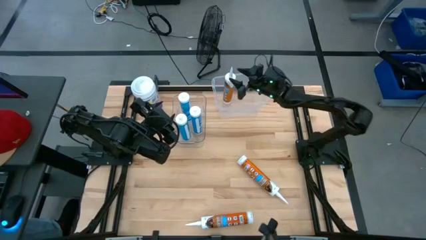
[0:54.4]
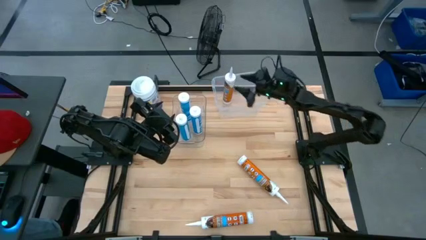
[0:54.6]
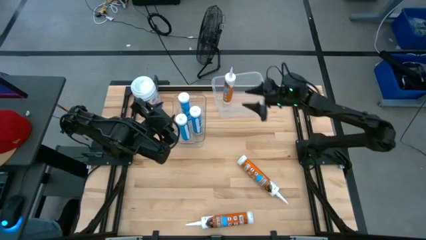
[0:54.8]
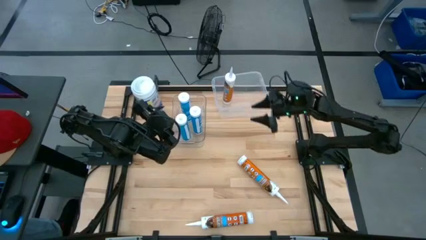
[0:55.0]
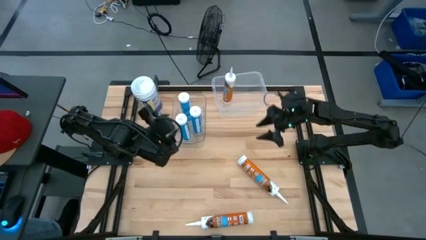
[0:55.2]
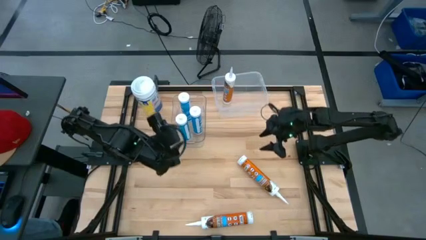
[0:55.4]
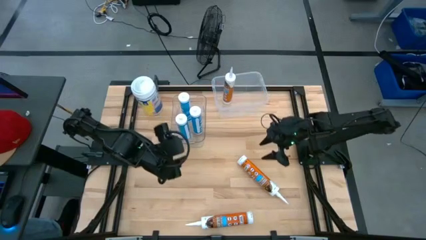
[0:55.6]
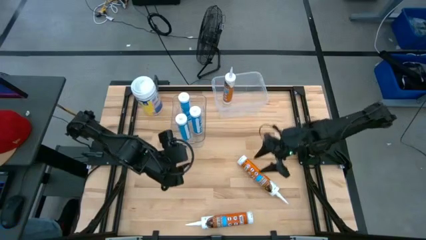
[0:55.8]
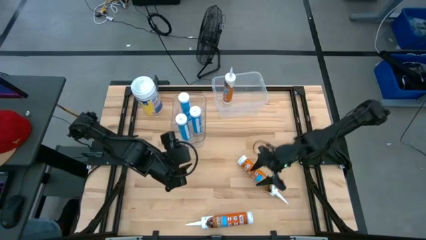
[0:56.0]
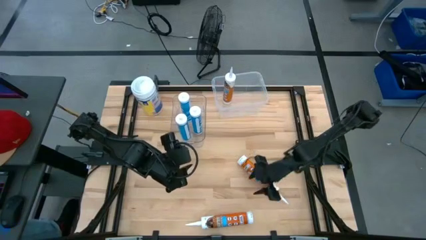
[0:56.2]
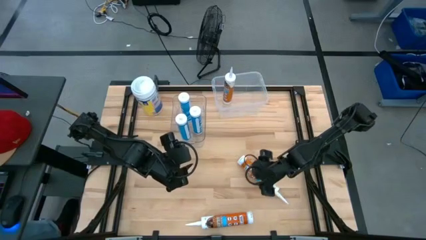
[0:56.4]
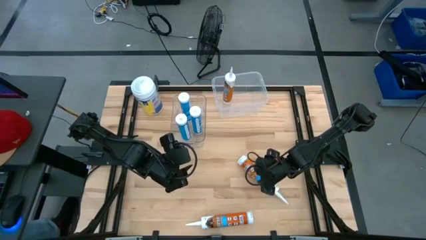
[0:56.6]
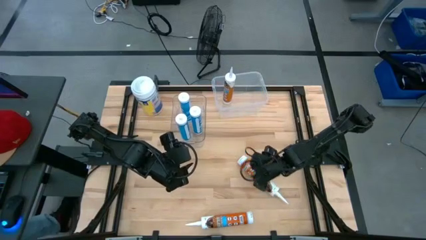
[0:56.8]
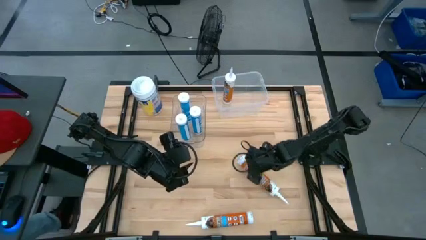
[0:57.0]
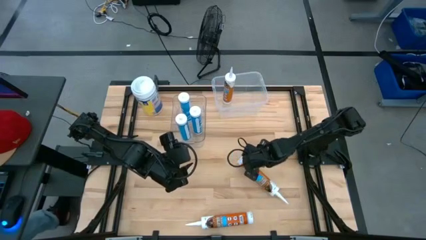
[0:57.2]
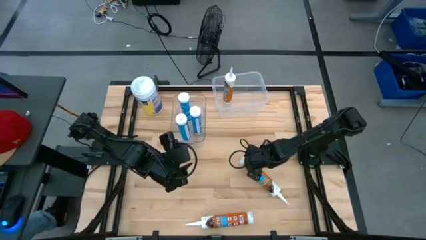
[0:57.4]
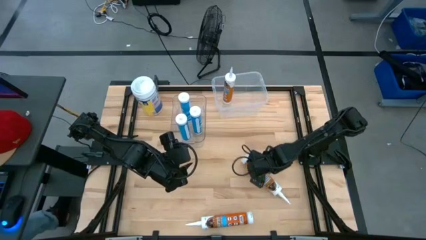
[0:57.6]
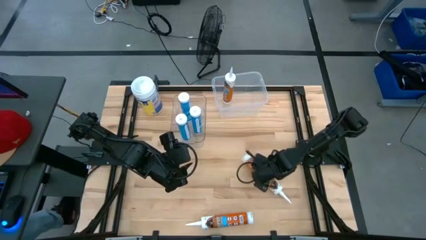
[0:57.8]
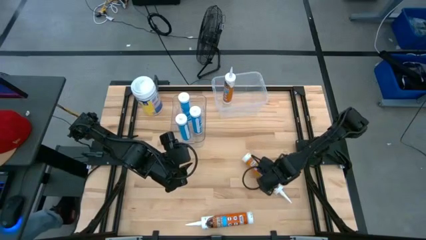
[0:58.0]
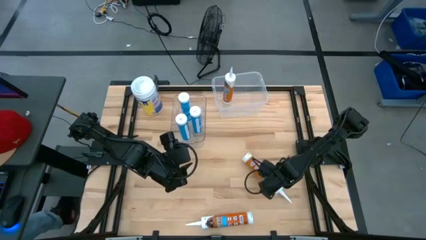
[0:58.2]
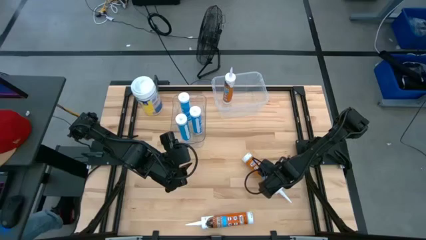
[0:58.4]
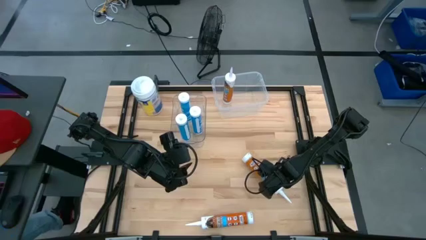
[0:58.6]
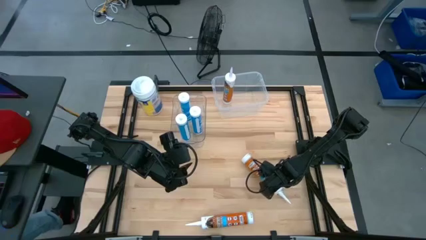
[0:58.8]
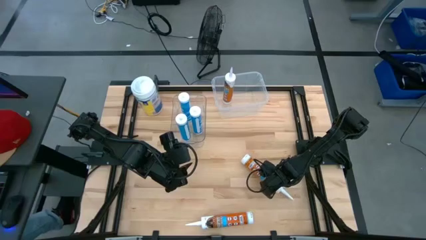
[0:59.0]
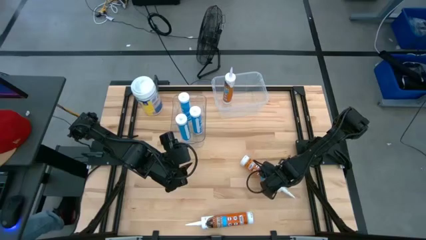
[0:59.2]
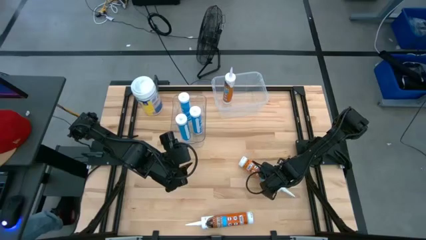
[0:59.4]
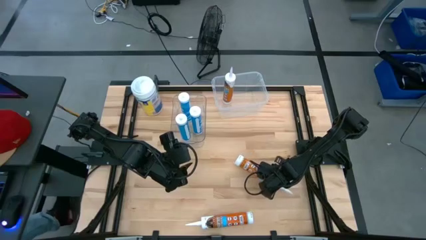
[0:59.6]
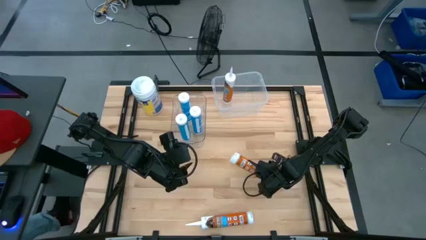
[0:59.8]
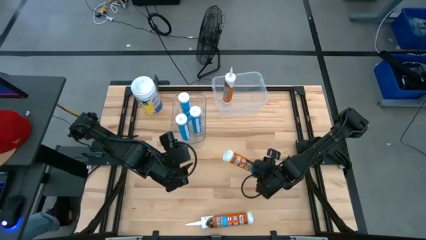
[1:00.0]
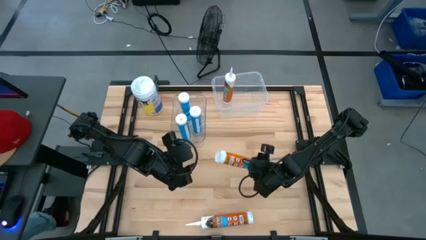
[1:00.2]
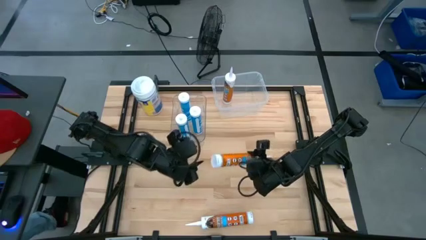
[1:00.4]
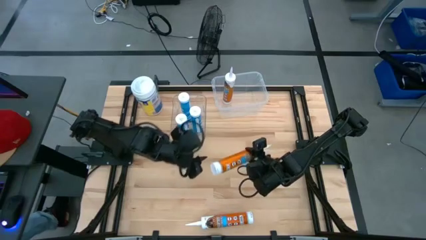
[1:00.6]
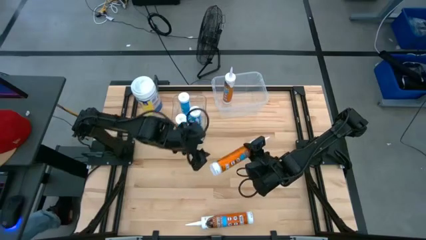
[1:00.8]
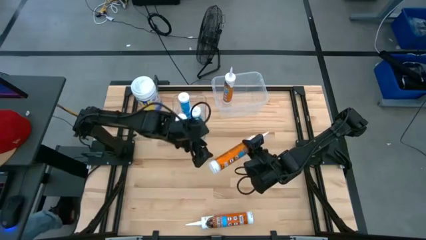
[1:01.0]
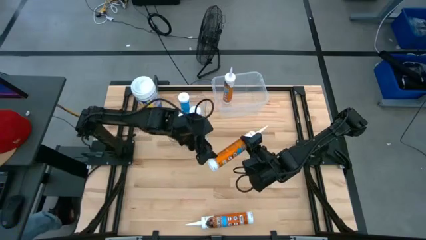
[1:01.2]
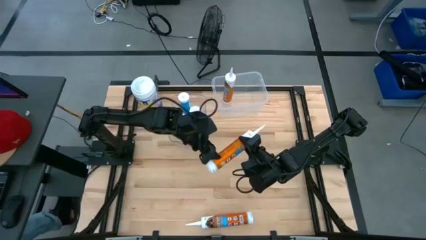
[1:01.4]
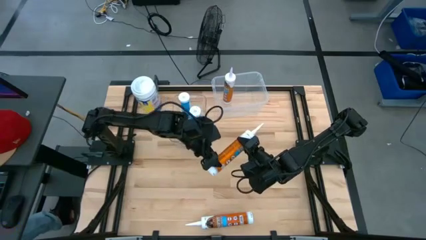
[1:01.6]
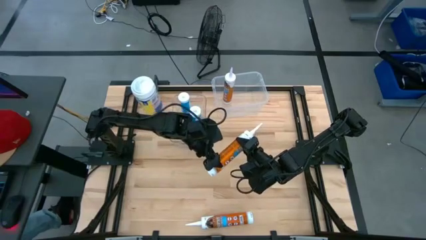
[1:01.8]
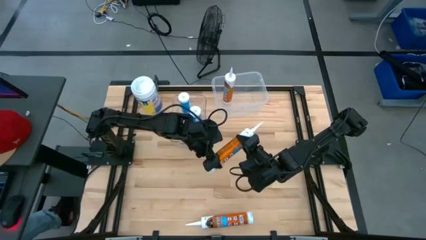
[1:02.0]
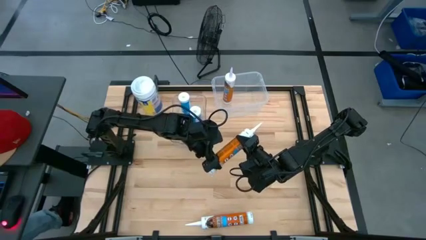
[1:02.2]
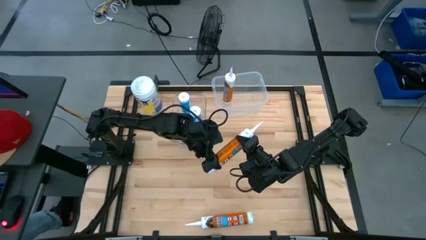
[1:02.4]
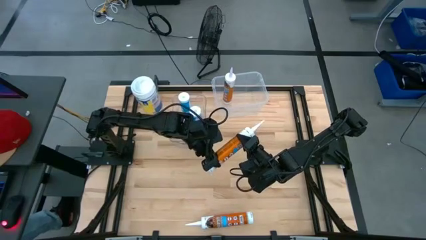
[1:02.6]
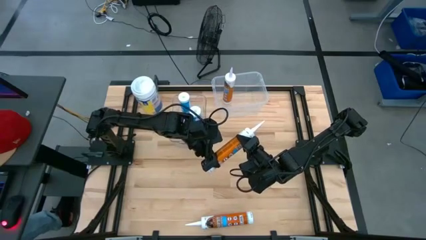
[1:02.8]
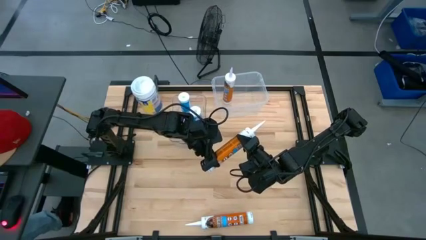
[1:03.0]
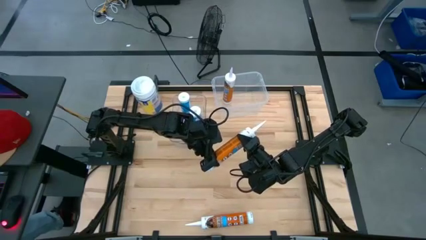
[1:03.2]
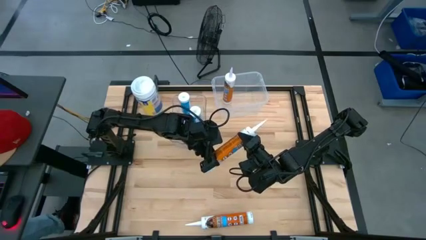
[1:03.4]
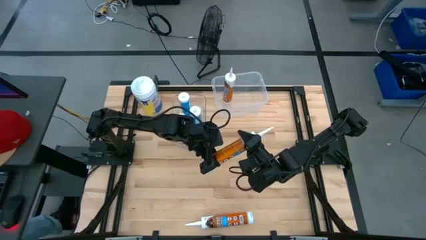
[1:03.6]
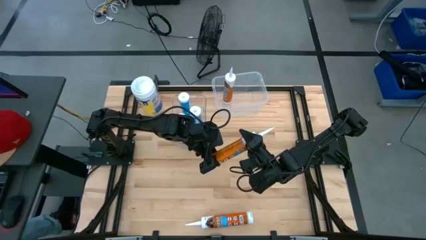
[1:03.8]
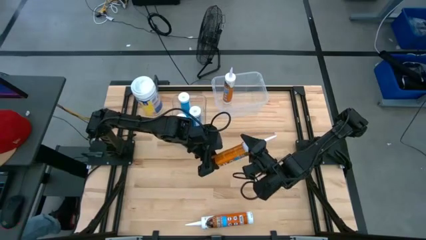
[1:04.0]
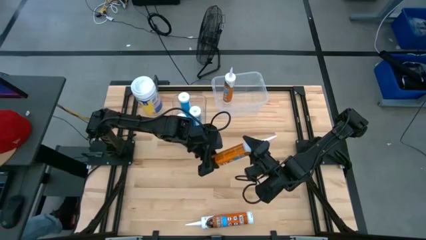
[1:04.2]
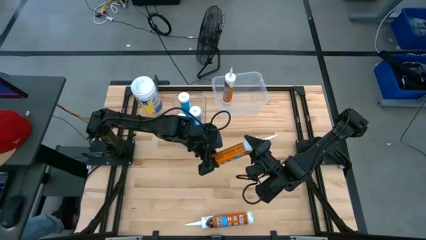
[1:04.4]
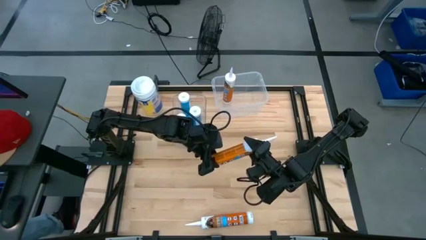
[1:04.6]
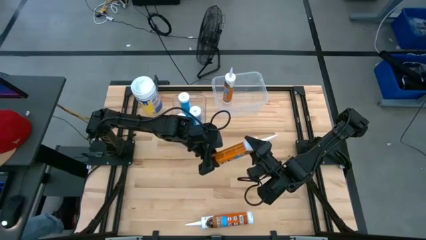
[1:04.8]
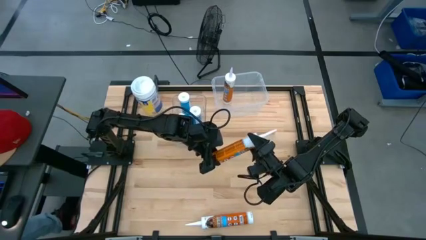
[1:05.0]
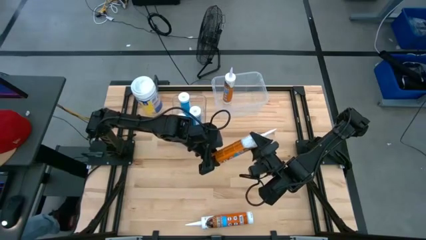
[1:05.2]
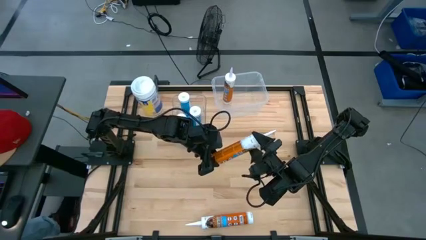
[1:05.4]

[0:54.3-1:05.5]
Task: Pick & place silicon tubes, Sealant and Lysol wipes
Put the top orange sealant into the white bin

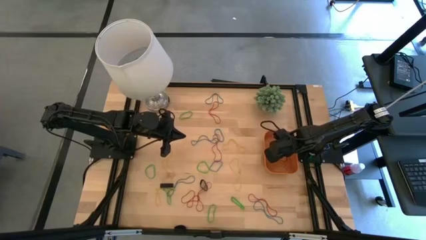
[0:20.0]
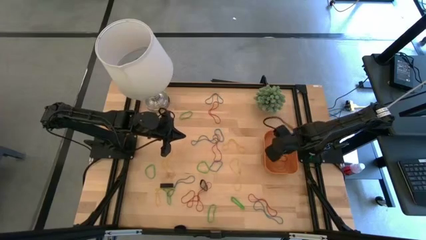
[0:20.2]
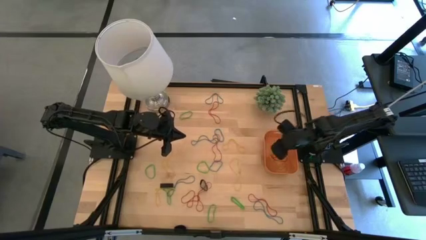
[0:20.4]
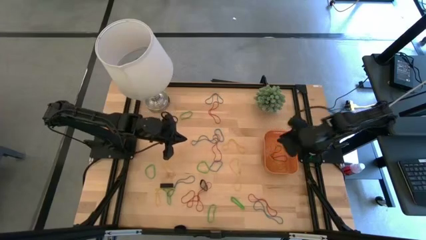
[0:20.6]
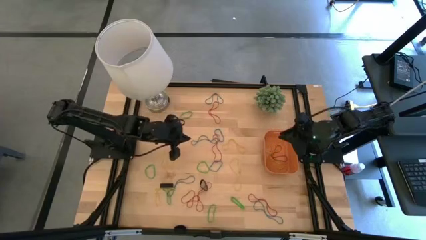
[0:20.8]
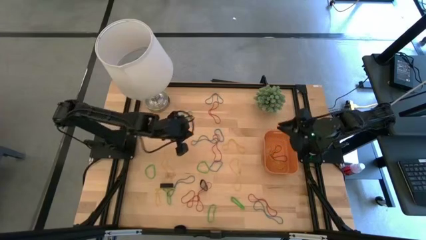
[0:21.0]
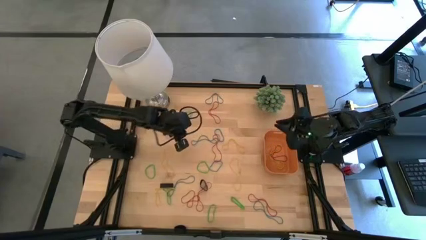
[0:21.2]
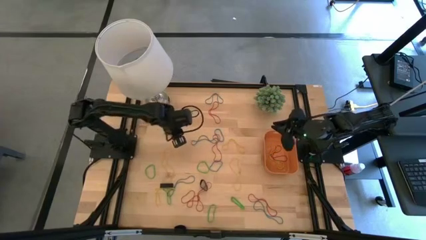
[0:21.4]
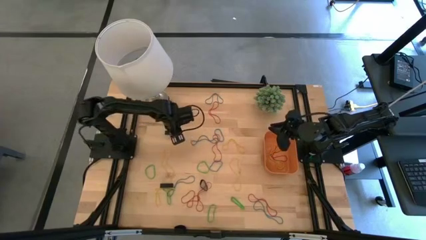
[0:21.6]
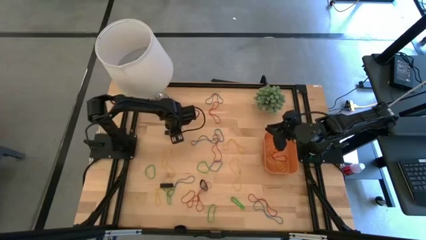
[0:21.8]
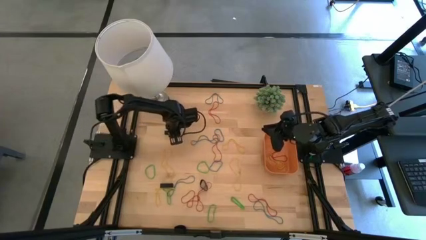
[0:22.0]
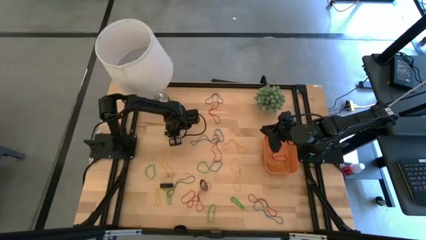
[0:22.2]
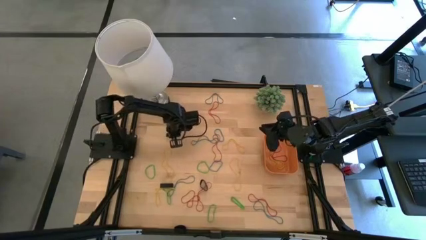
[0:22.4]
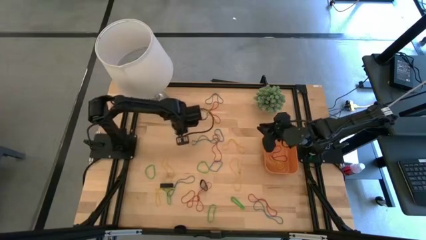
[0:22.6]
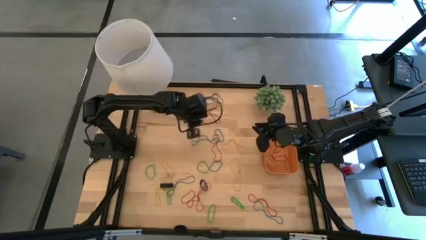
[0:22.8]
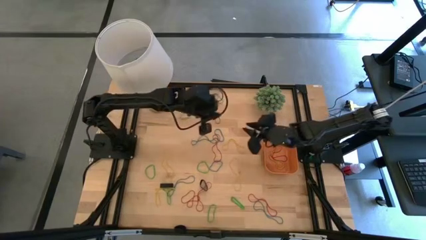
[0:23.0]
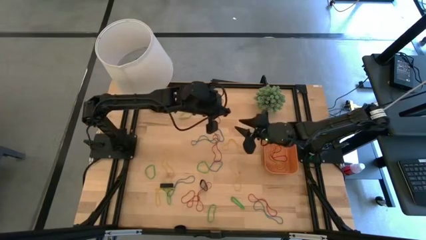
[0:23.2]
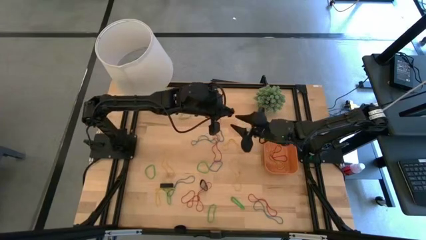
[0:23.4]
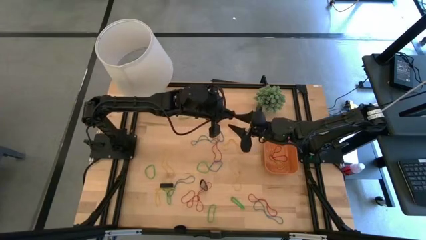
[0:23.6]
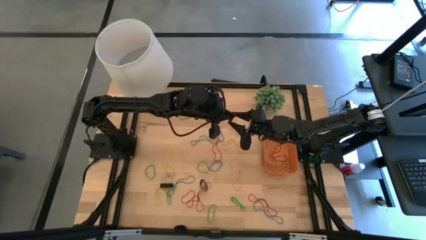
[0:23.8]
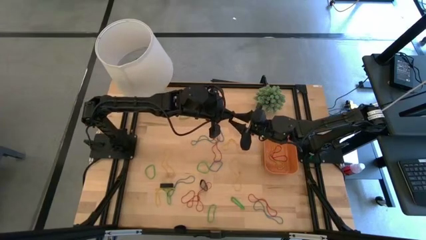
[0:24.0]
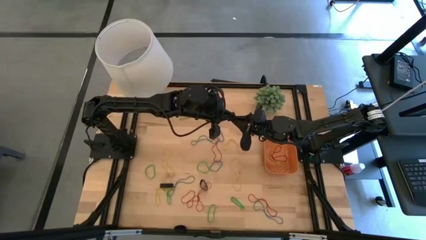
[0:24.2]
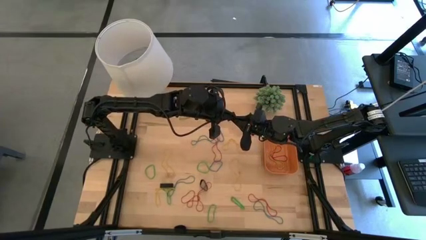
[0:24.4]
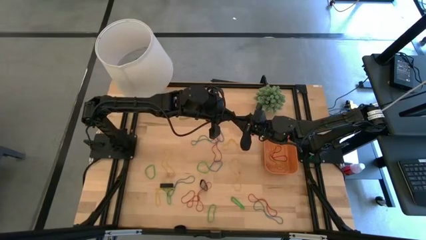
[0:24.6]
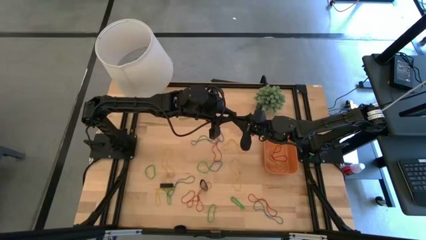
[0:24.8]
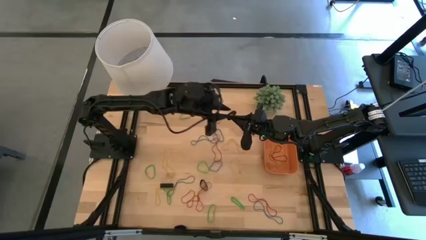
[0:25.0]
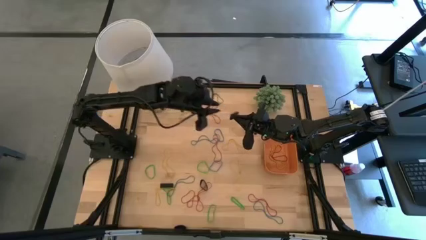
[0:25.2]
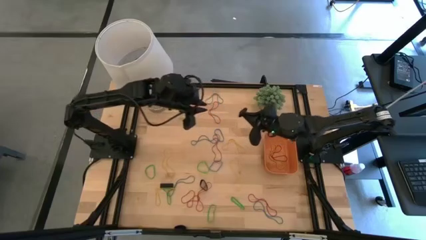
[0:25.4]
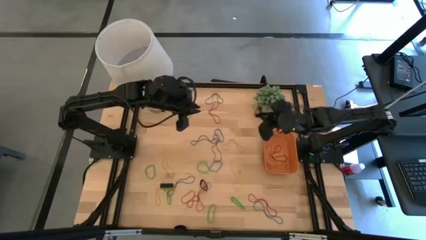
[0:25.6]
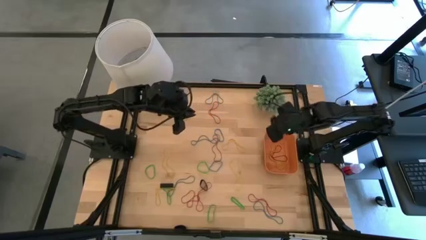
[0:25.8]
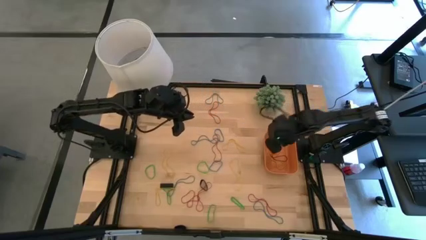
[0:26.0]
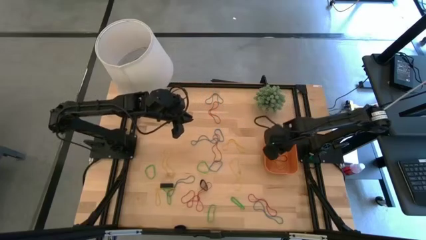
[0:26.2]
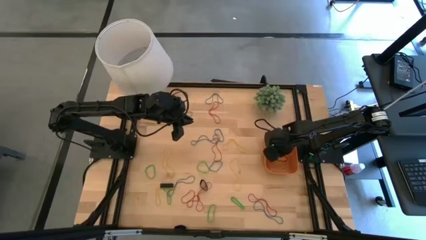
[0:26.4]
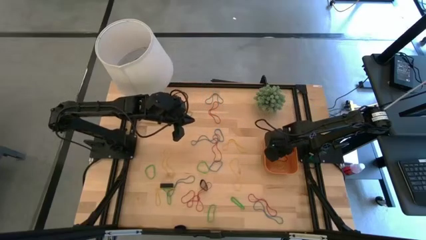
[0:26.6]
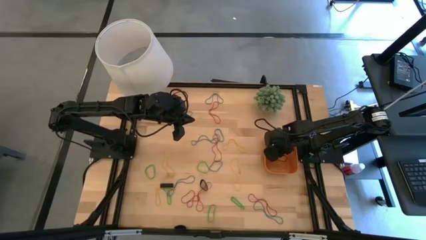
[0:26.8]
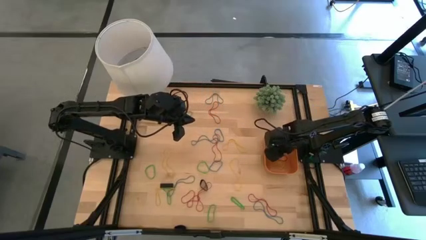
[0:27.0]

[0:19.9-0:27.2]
Task: Pick and place rubber bands into bin
Put the black rubber band into the orange bin
